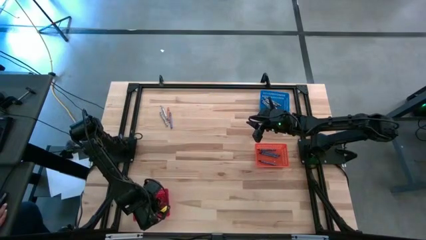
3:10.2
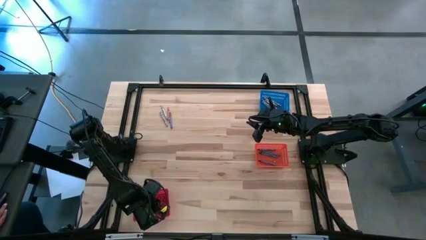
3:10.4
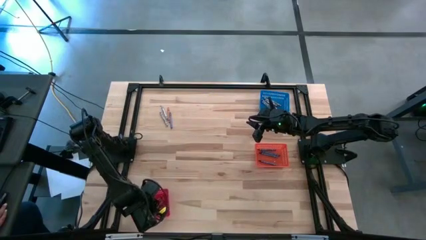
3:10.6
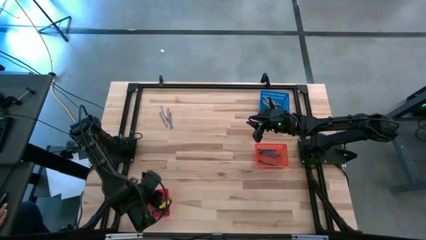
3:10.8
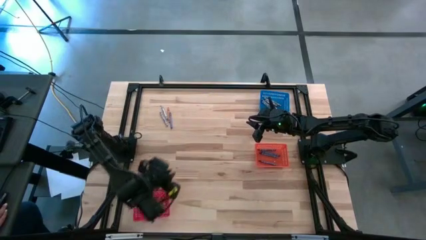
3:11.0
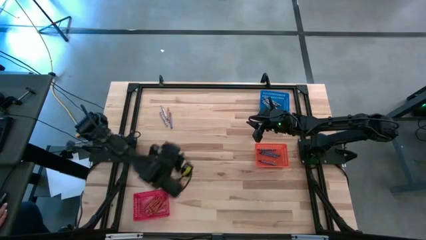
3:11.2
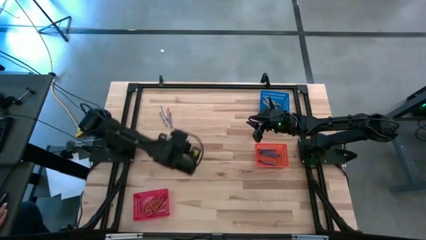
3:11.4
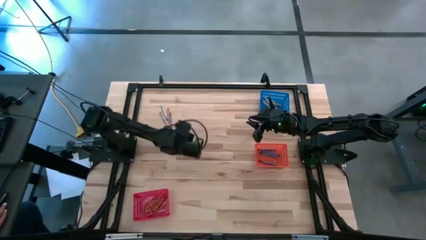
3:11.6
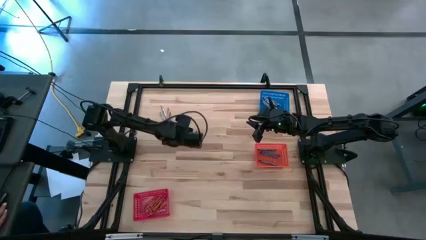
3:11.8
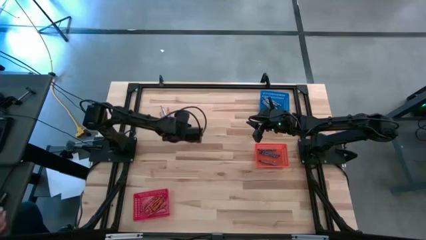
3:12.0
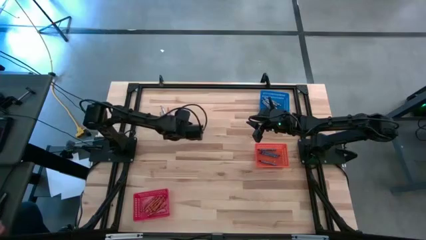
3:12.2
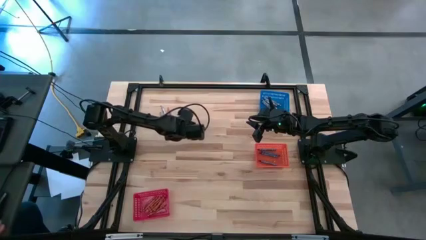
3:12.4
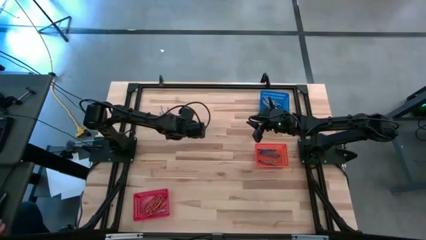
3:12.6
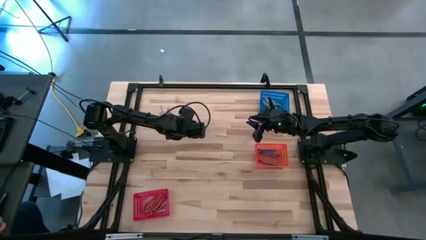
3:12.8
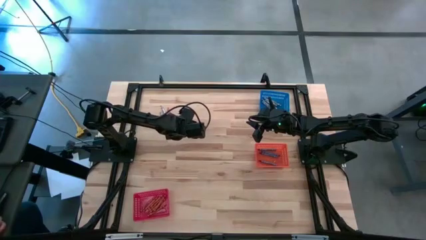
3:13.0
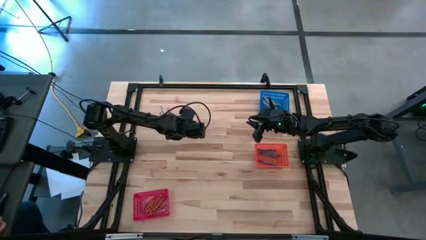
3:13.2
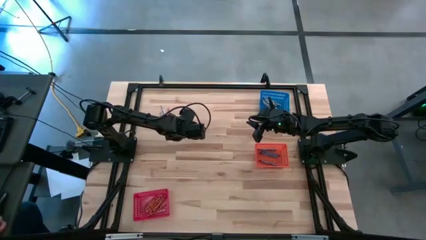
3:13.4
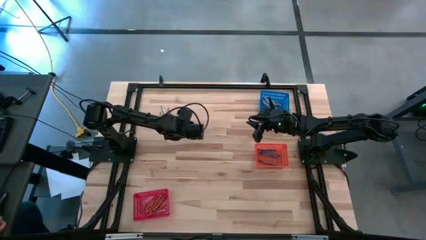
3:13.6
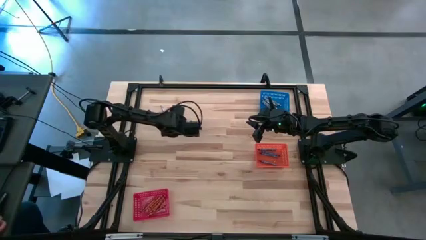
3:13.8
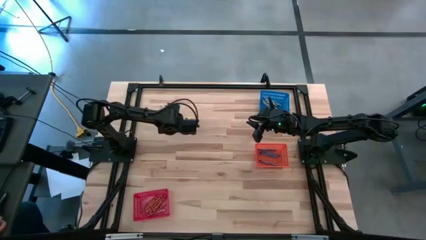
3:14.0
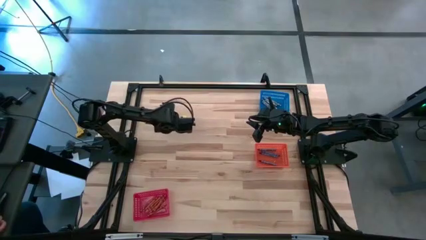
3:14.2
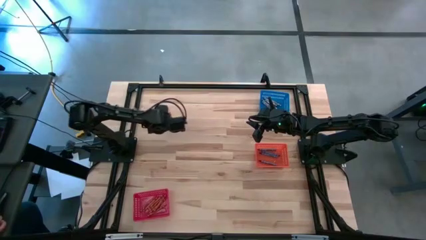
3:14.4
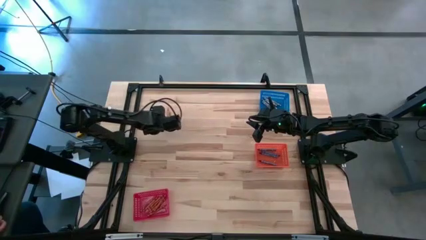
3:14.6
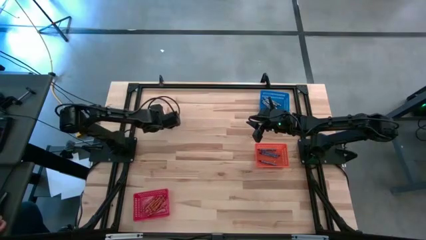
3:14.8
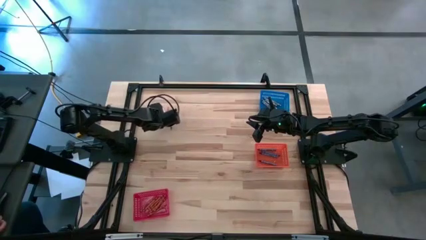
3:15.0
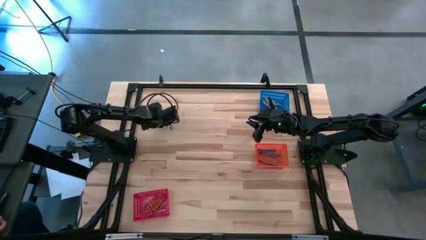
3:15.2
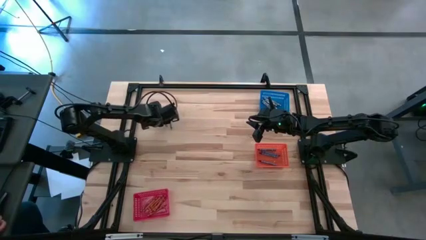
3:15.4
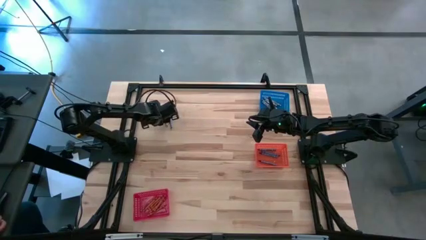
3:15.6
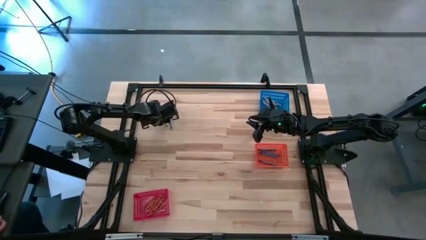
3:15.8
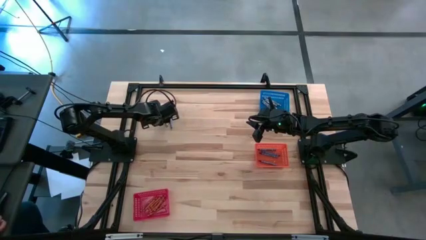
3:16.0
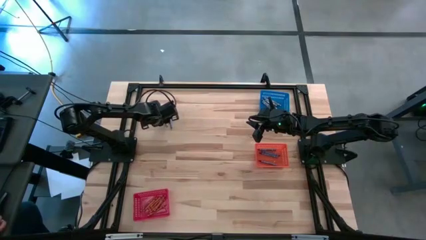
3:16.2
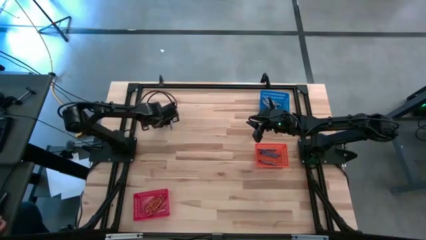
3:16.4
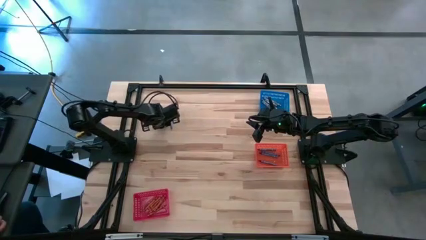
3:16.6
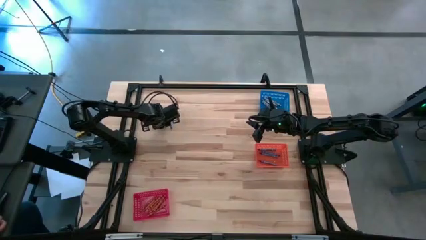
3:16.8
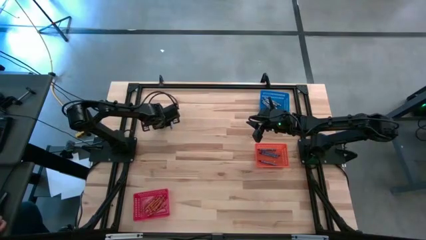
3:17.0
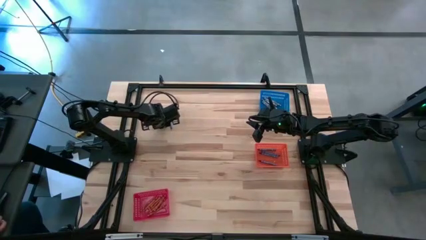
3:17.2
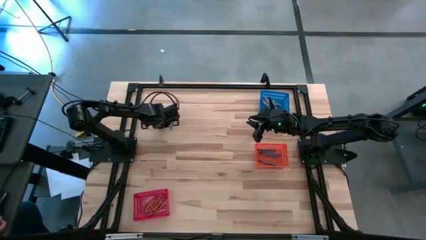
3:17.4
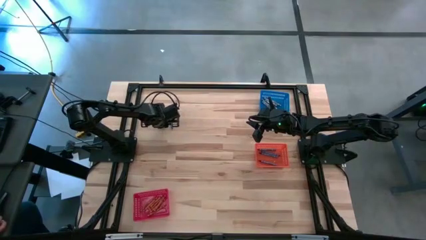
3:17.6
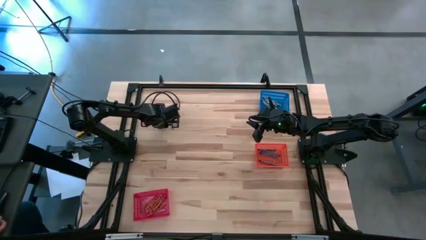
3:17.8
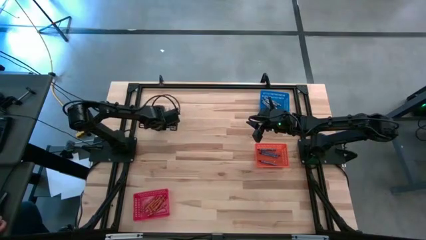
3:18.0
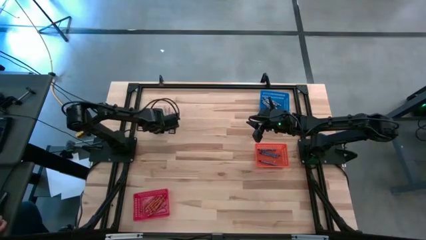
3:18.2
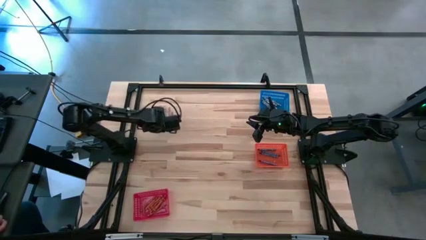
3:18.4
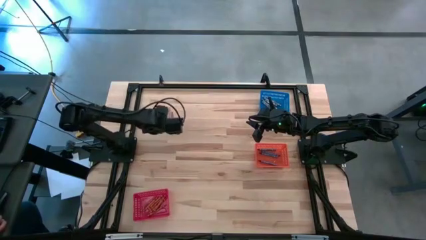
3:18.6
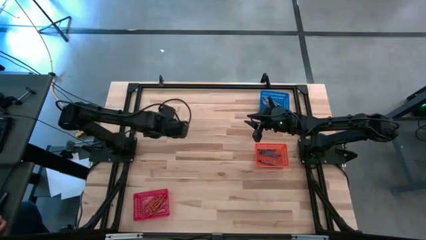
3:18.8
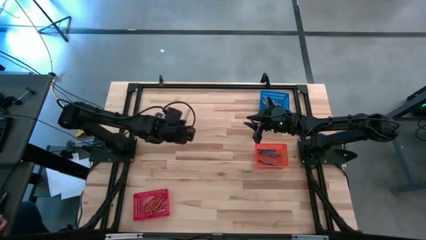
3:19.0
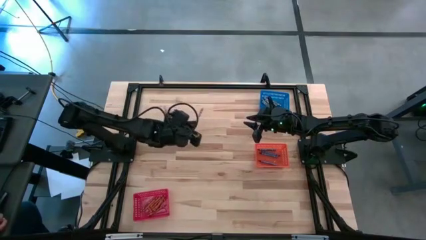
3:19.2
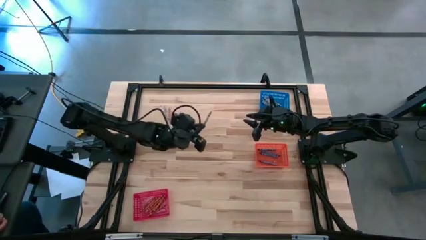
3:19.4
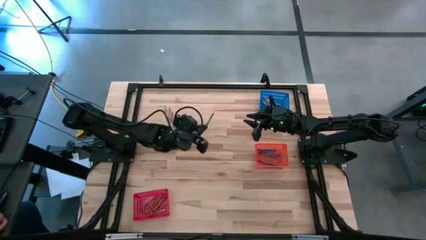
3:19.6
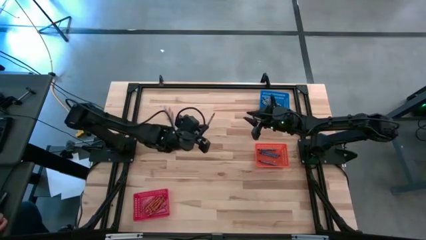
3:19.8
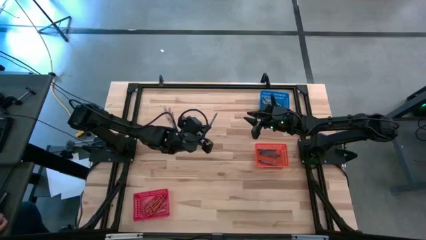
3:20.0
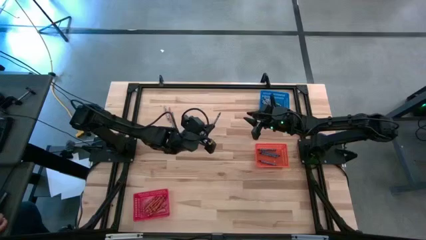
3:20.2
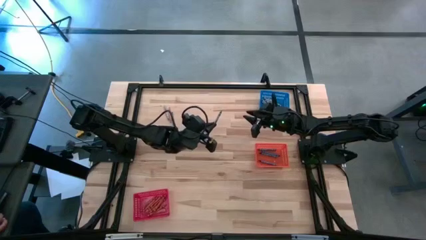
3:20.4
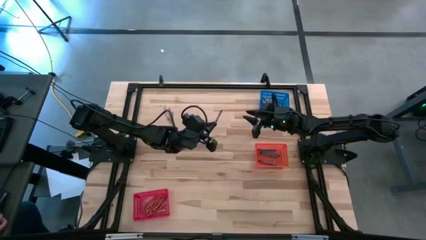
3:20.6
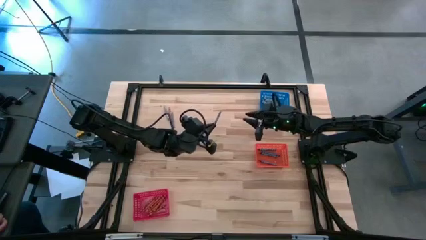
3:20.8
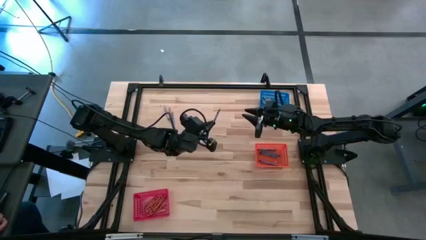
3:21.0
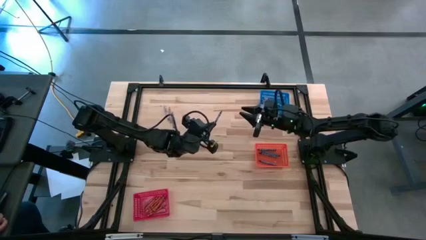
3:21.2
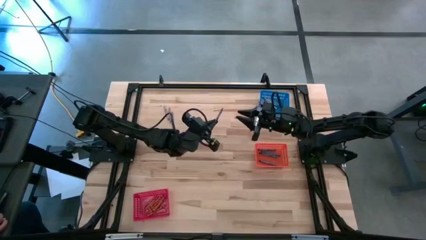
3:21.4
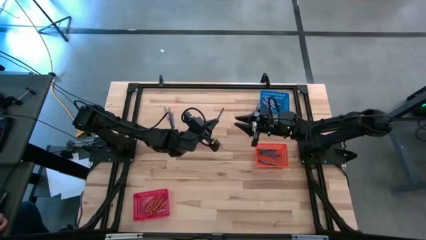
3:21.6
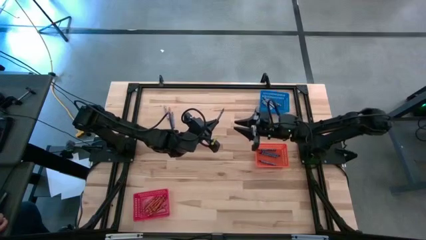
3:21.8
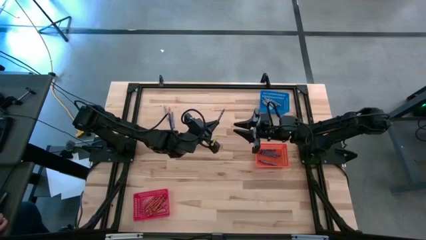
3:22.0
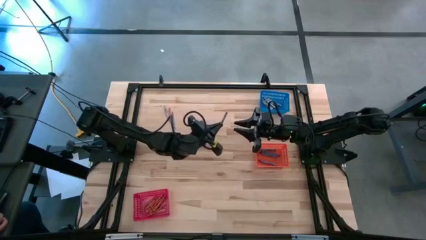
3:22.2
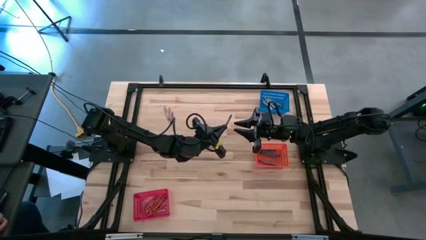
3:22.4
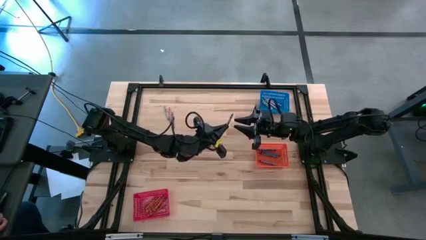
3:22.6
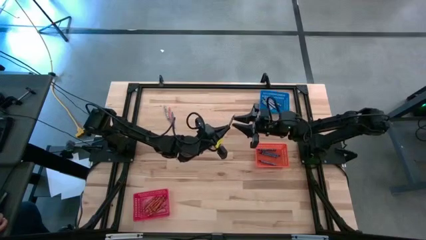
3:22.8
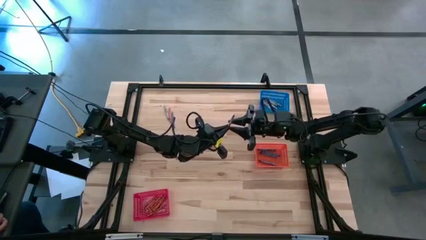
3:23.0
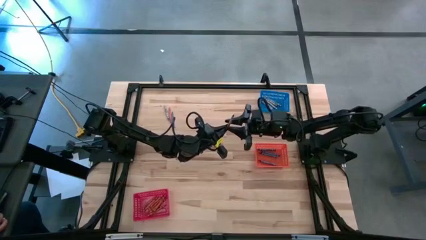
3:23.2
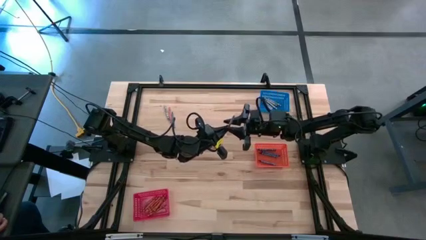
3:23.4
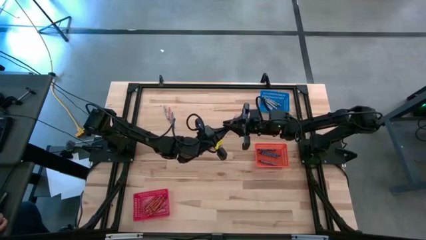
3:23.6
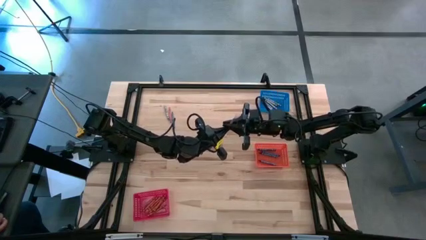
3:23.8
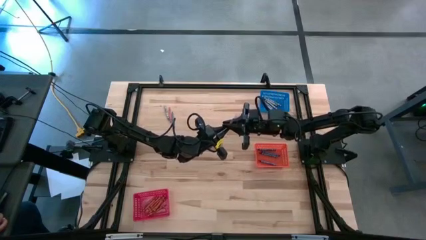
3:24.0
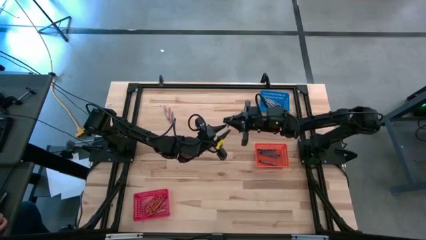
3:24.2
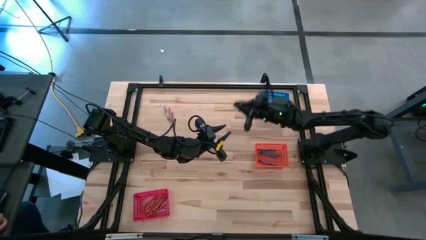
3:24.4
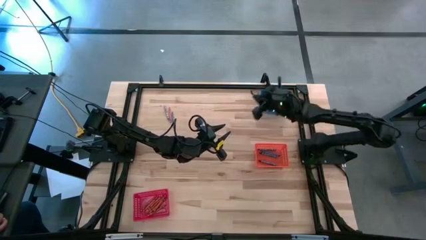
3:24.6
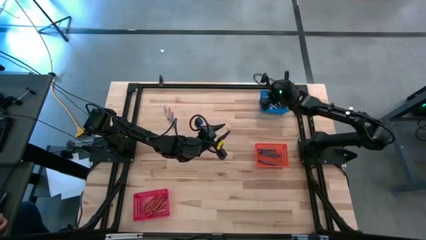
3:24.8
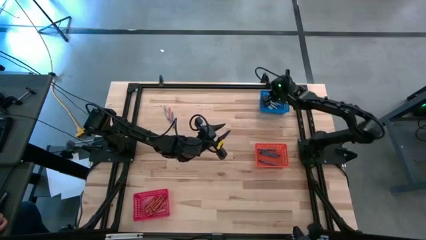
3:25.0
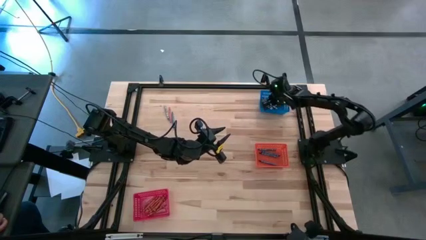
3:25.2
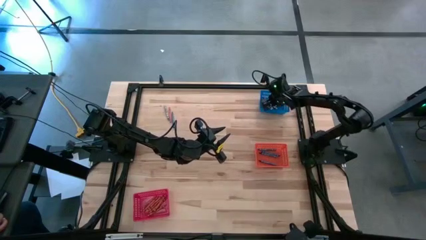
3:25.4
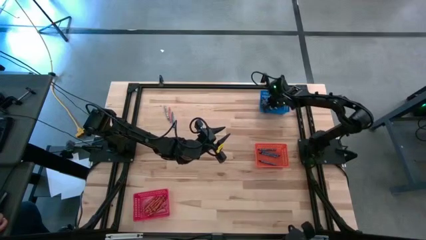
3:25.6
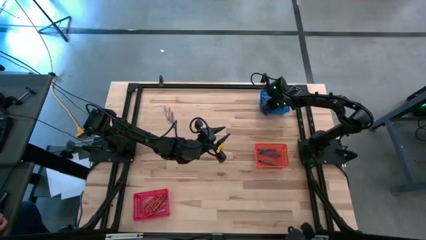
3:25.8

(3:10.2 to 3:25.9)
Task: Sort crayons
Put the gray crayon into the blue bin
